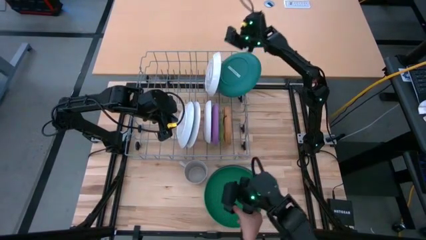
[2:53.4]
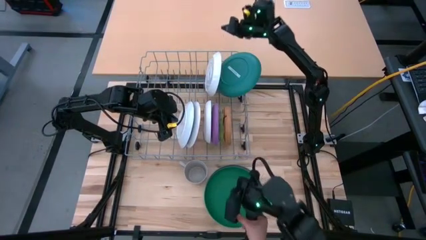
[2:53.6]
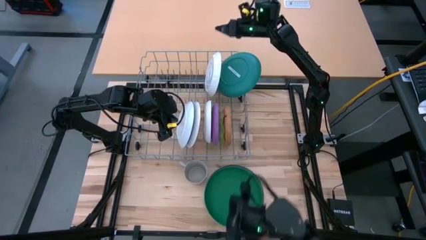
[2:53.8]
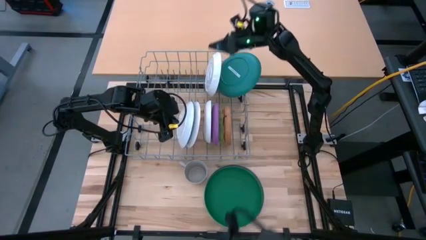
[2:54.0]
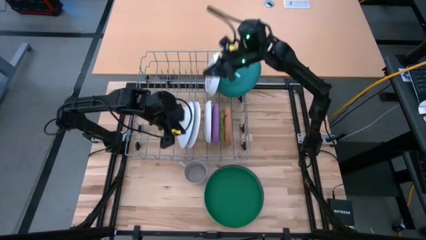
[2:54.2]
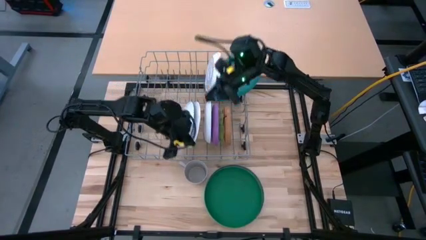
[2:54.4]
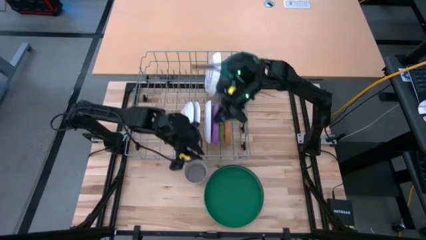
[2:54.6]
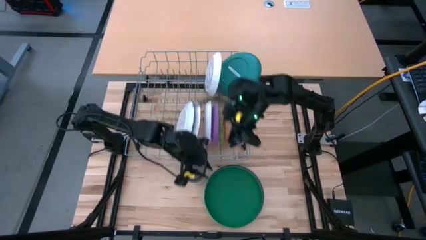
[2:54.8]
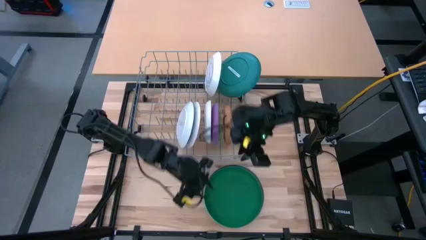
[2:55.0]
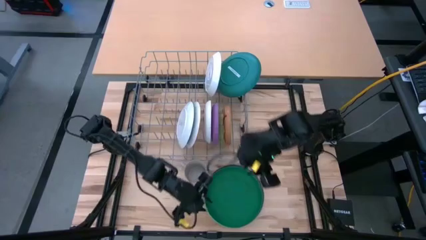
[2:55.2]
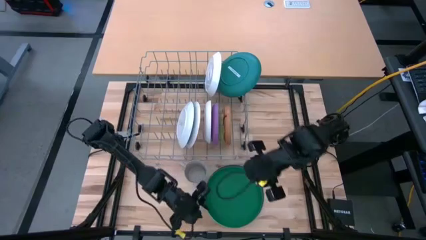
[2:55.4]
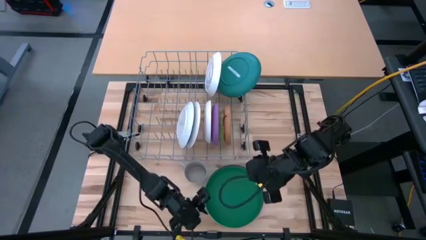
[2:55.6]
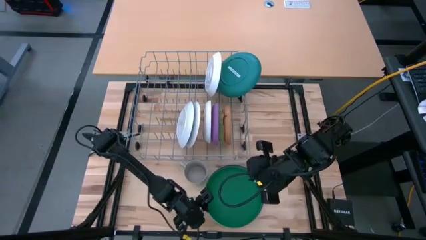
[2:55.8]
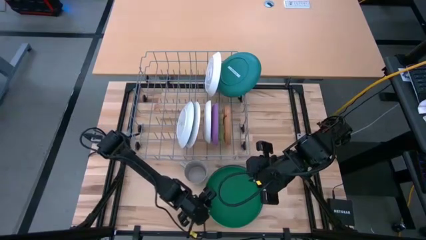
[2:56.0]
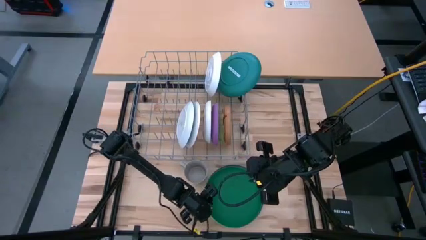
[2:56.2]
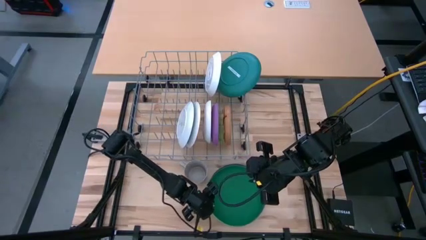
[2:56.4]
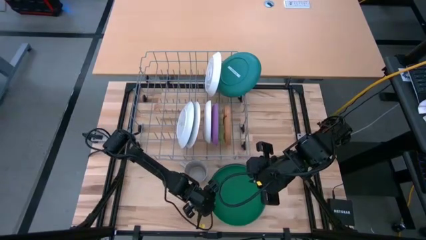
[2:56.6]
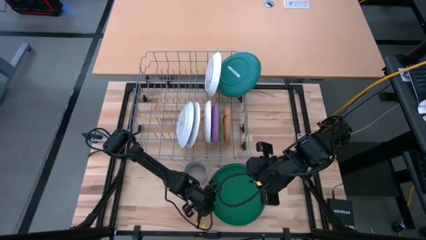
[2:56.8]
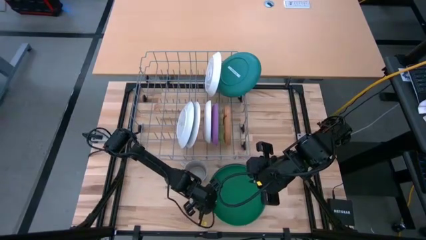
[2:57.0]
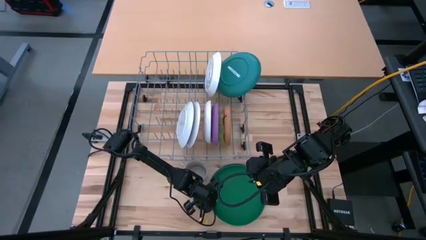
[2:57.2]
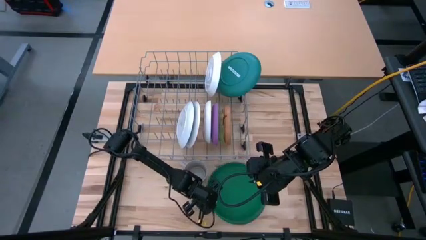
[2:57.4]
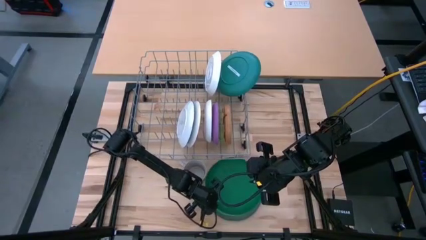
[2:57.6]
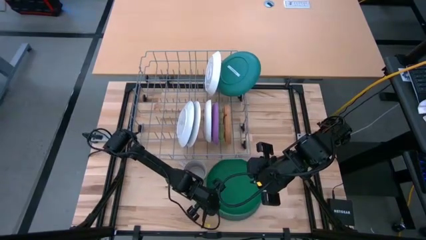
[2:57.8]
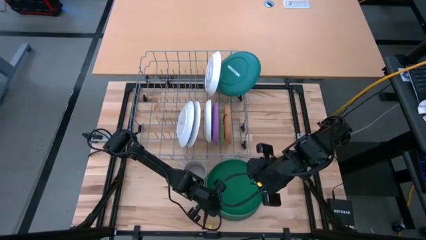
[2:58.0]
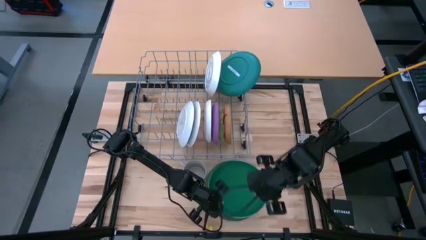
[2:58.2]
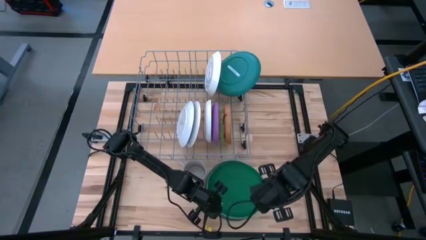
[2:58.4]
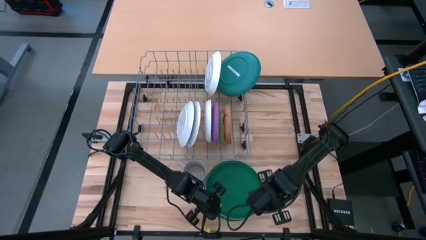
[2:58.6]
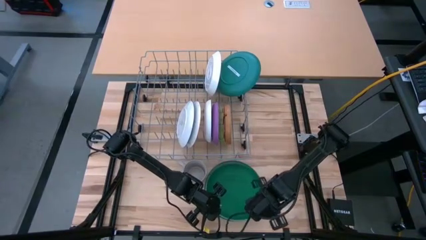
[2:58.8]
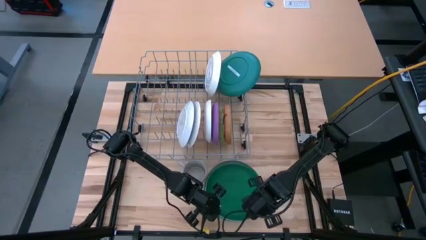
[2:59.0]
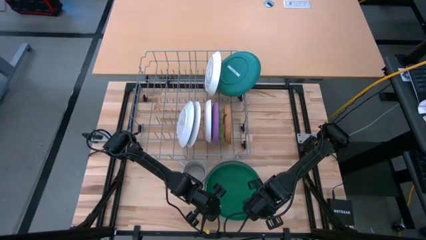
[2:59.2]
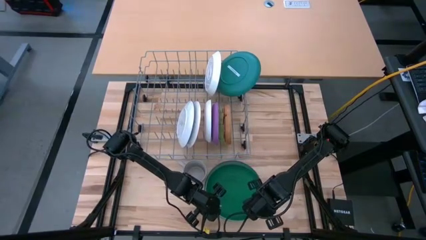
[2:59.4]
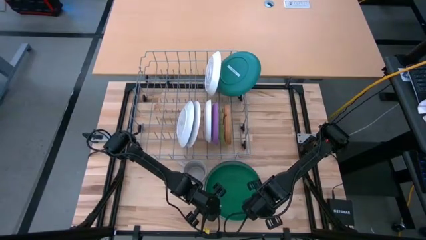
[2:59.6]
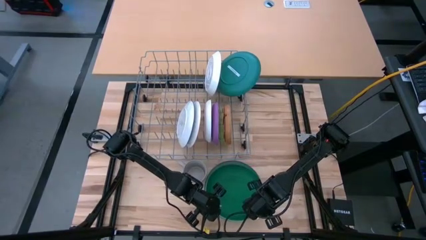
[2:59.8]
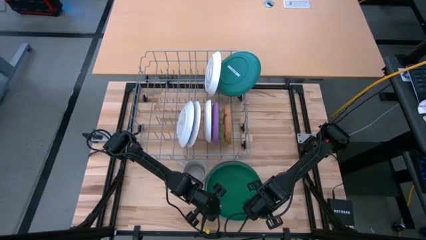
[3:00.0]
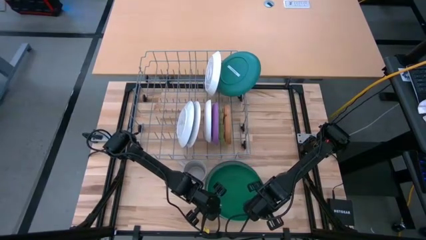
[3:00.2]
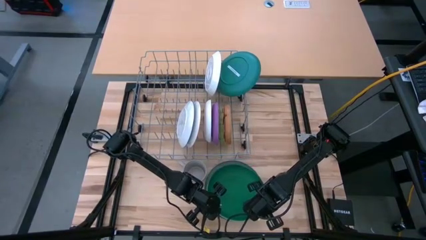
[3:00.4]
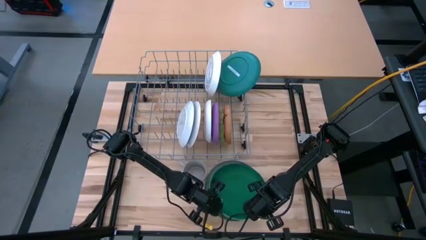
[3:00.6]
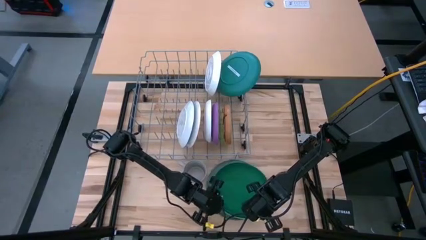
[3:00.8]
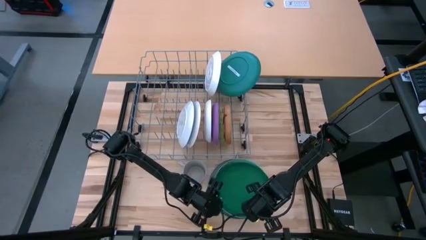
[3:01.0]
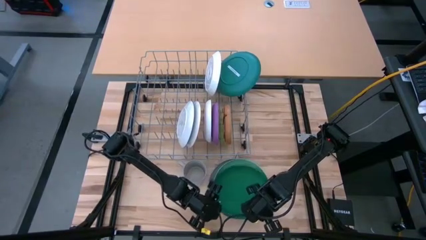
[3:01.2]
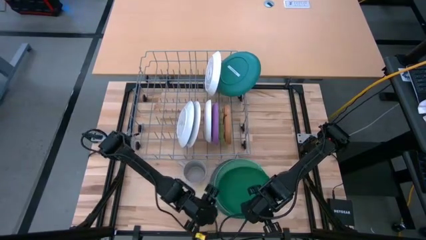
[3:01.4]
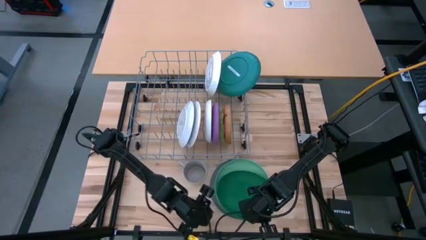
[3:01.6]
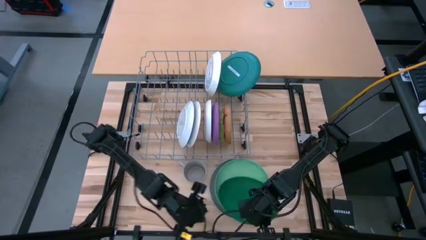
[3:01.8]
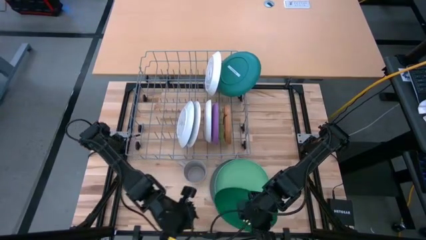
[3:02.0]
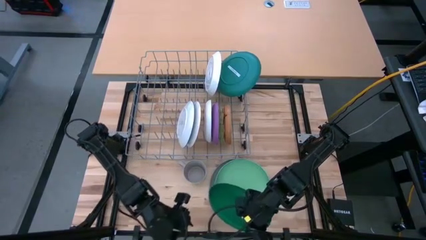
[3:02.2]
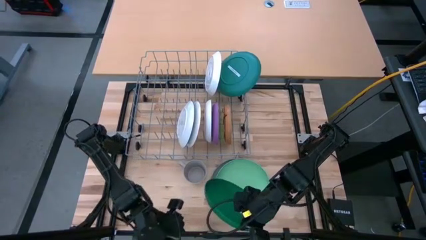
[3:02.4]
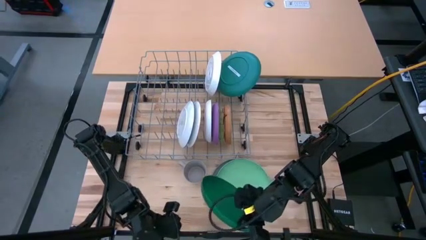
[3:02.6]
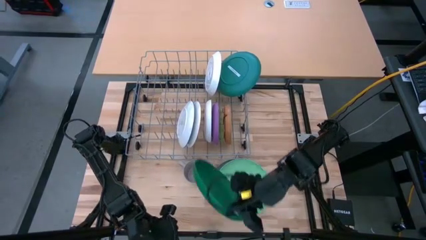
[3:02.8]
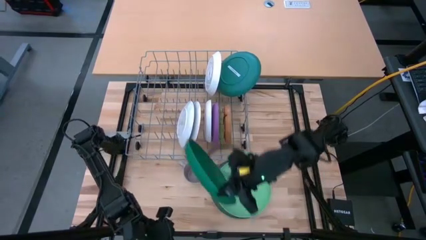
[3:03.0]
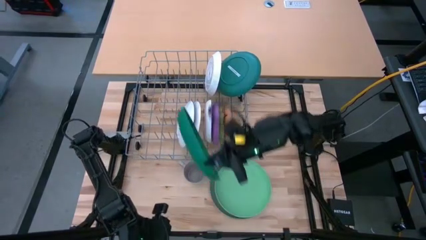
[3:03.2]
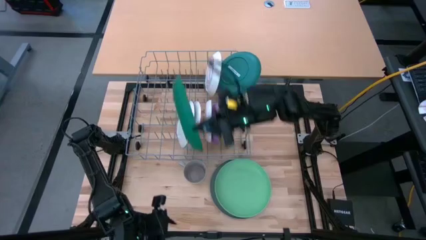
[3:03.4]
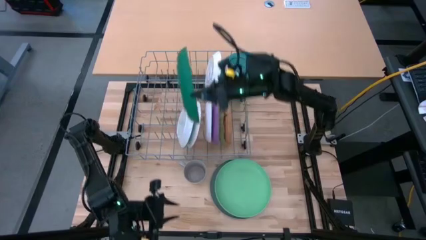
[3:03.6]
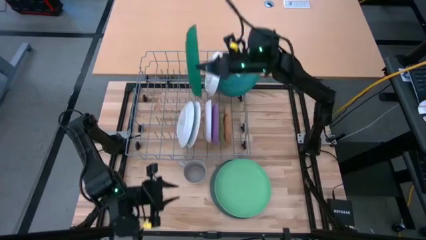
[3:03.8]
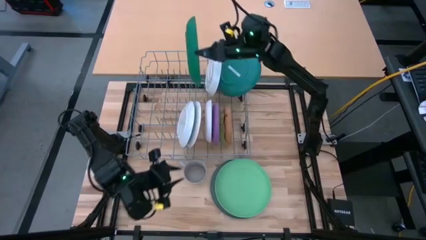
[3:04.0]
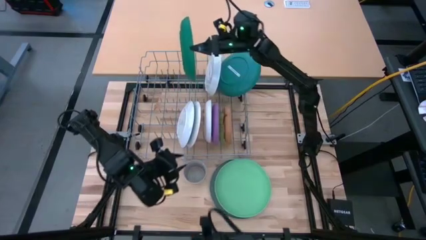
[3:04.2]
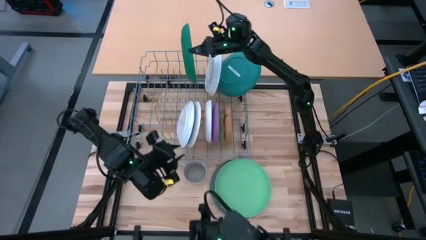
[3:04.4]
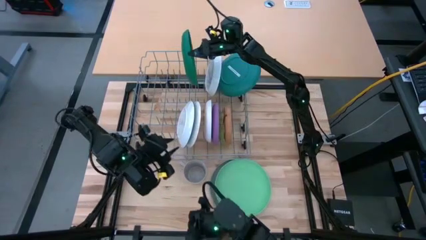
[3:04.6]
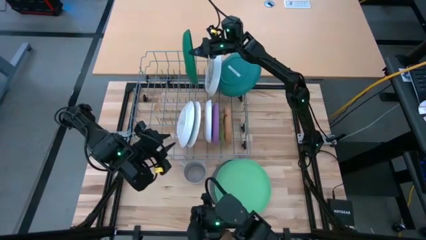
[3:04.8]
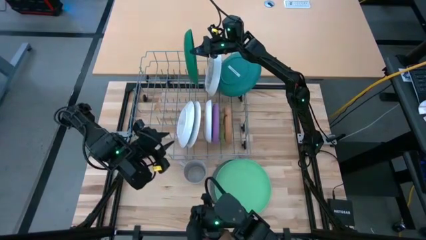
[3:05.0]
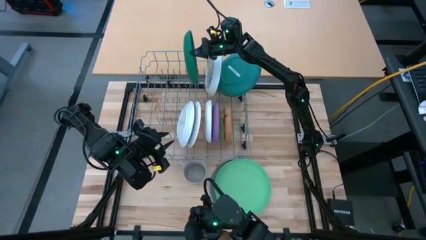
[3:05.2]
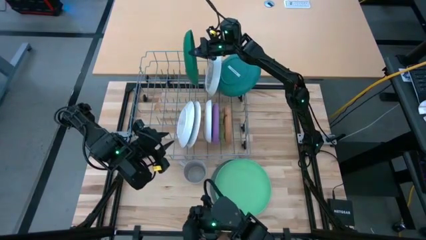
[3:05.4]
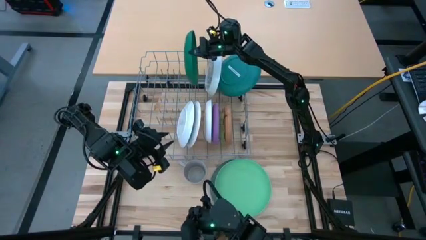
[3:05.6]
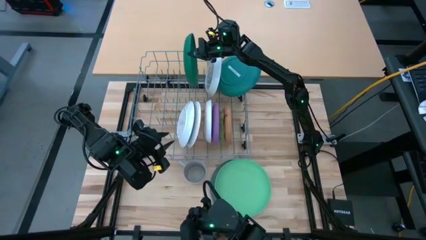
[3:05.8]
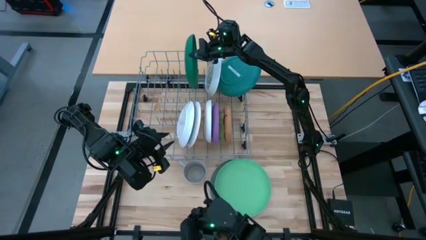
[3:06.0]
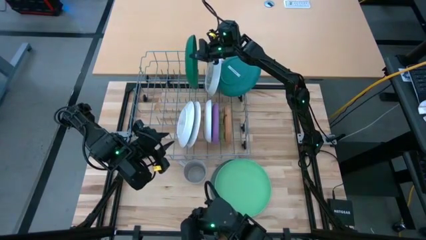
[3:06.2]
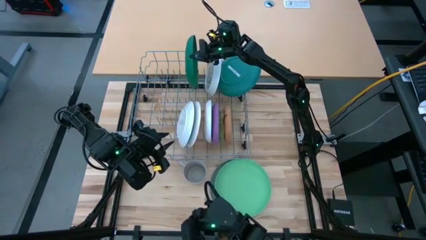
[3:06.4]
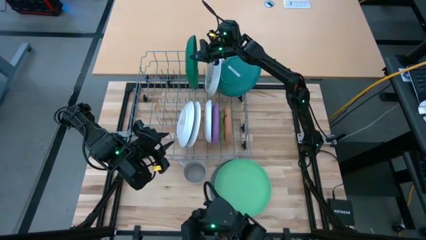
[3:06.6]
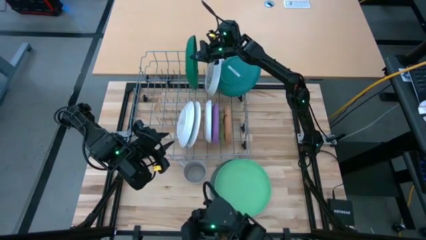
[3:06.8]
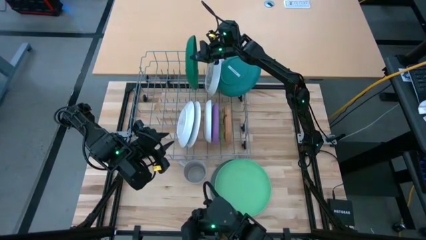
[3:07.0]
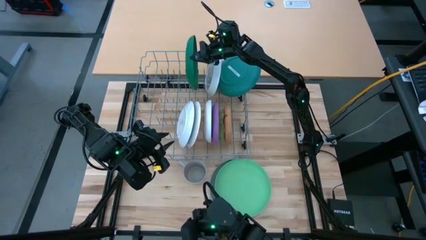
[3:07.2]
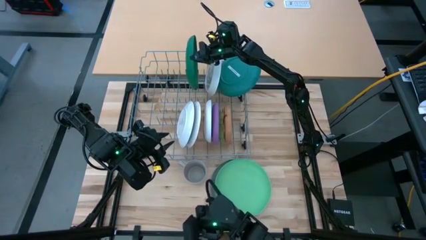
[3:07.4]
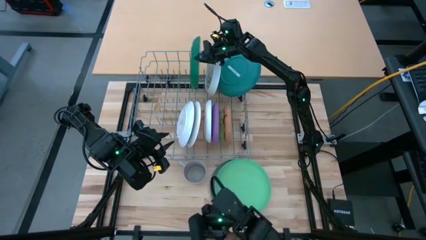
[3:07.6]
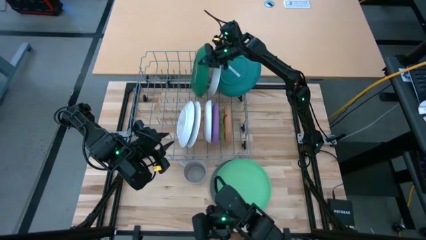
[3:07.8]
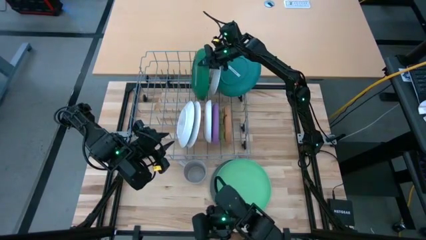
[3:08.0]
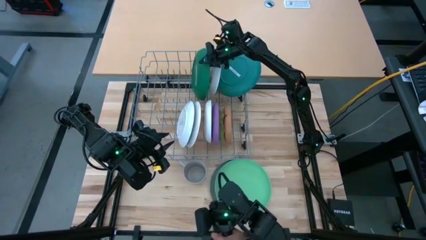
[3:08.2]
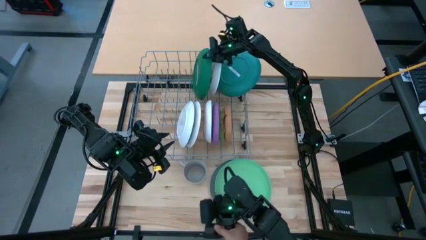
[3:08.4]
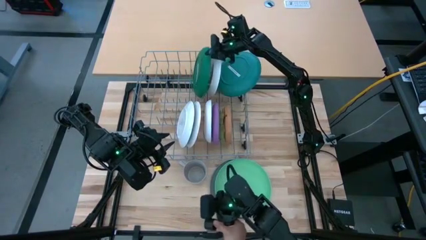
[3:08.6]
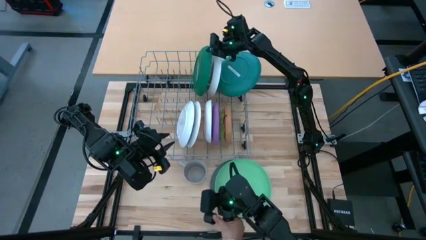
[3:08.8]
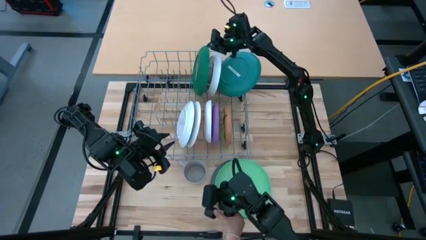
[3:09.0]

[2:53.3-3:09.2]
Task: Sort dishes
Put the dark green plate in the dish rack
